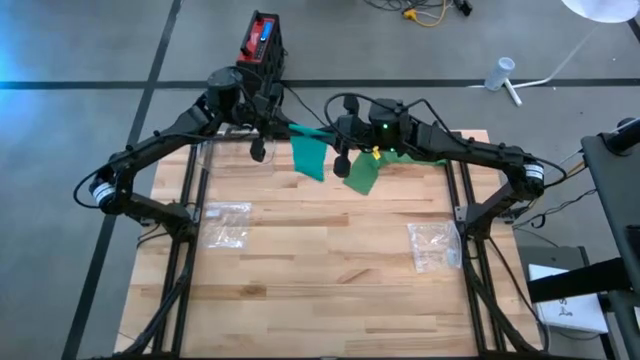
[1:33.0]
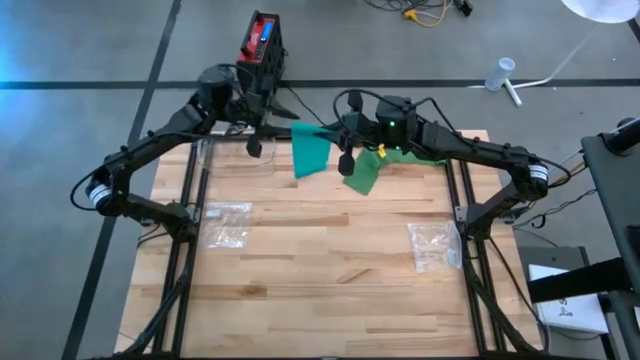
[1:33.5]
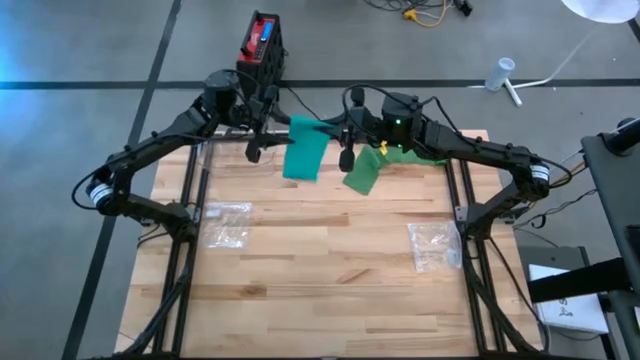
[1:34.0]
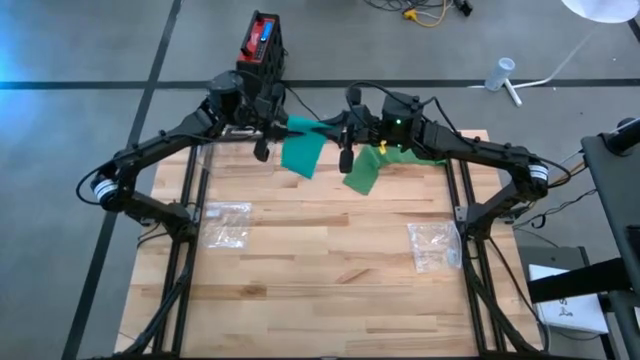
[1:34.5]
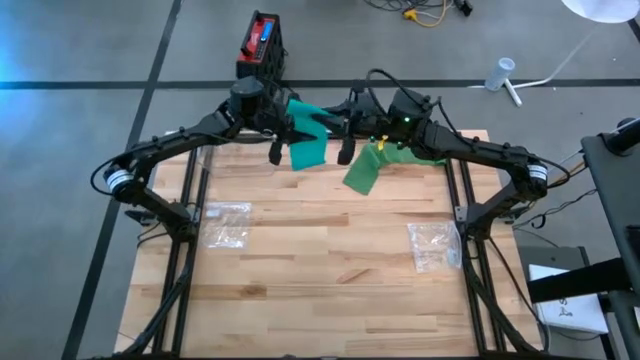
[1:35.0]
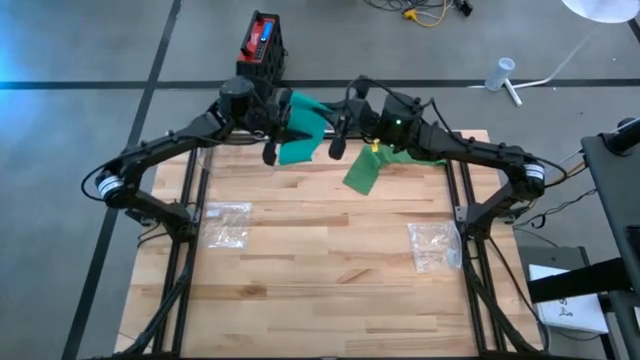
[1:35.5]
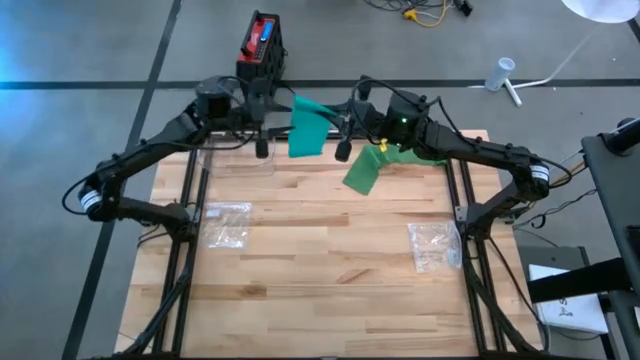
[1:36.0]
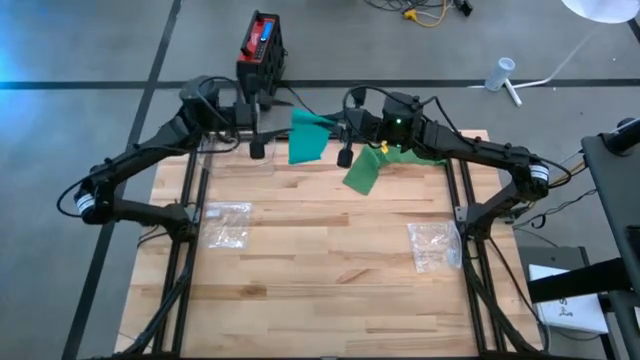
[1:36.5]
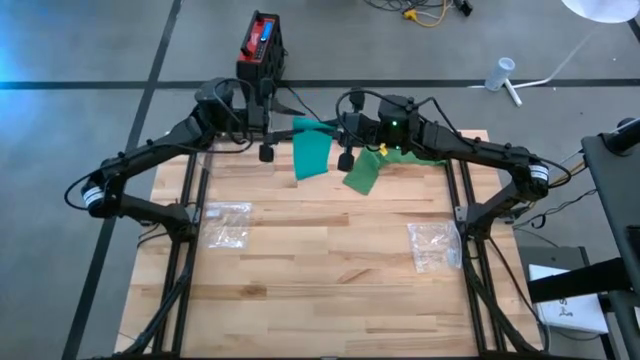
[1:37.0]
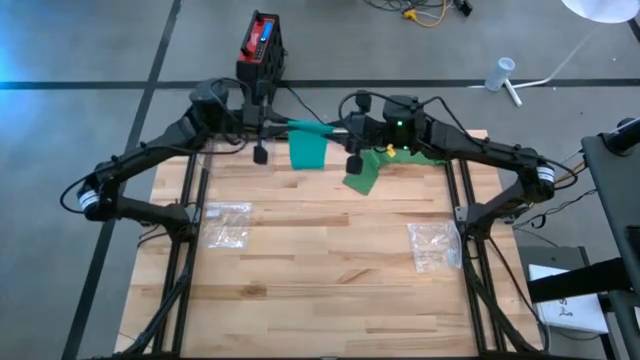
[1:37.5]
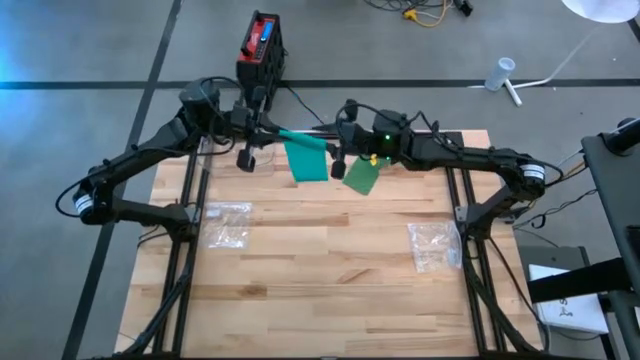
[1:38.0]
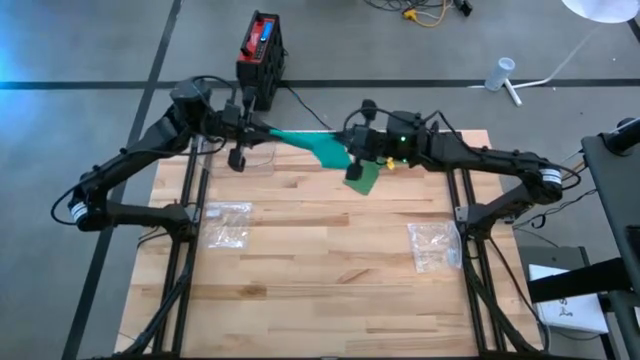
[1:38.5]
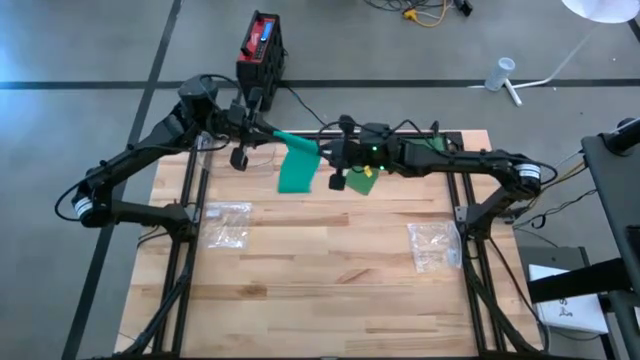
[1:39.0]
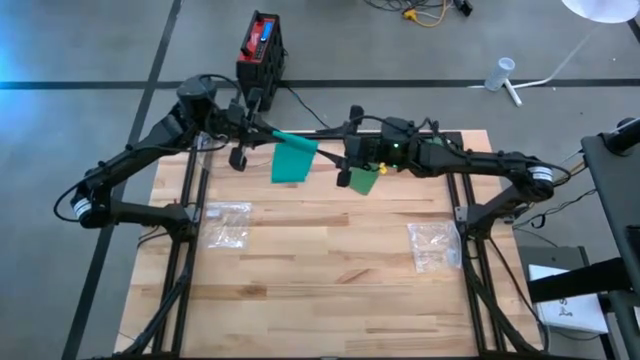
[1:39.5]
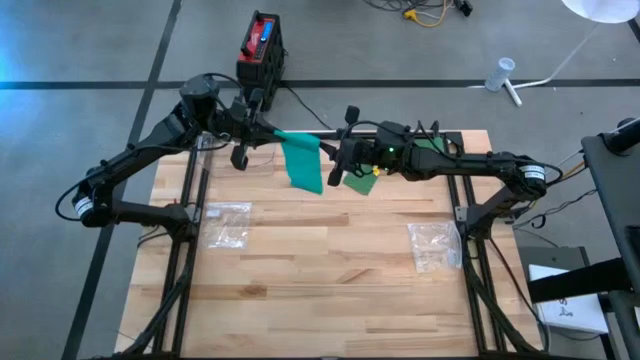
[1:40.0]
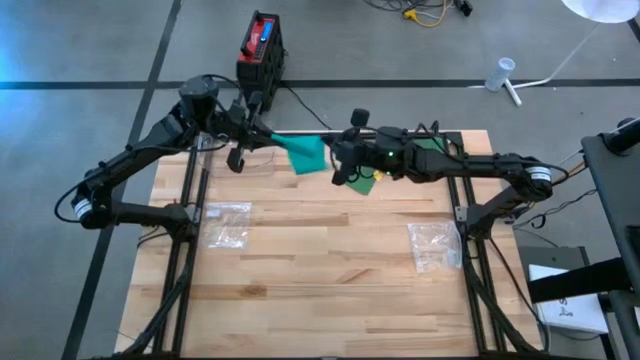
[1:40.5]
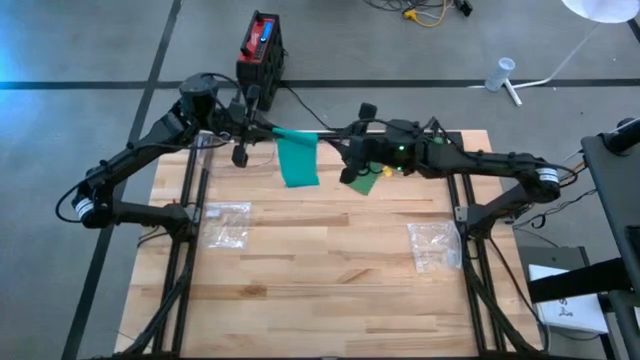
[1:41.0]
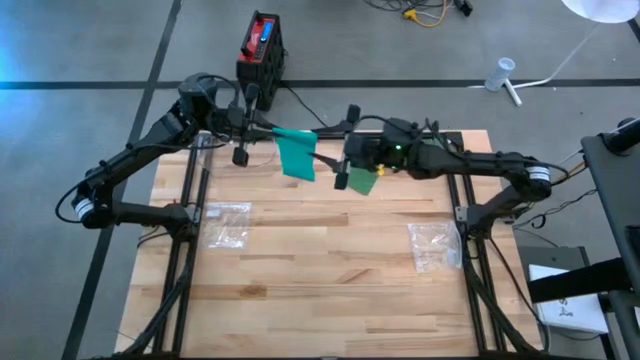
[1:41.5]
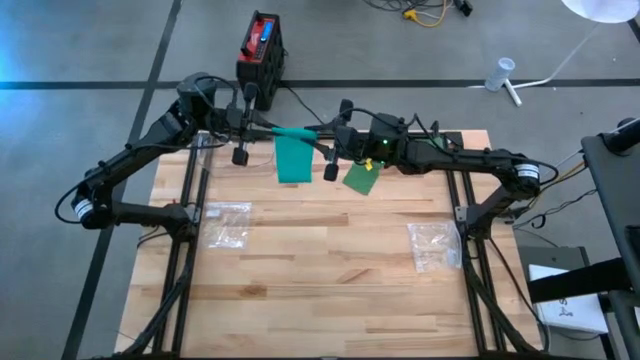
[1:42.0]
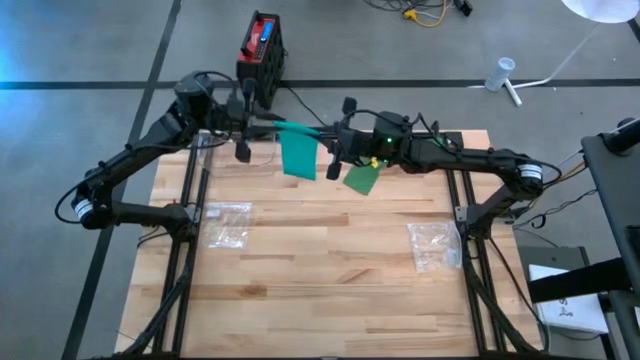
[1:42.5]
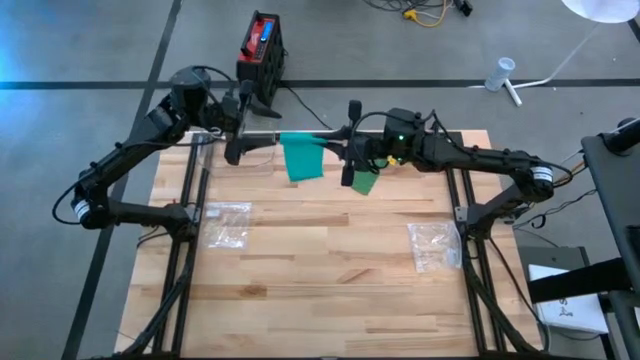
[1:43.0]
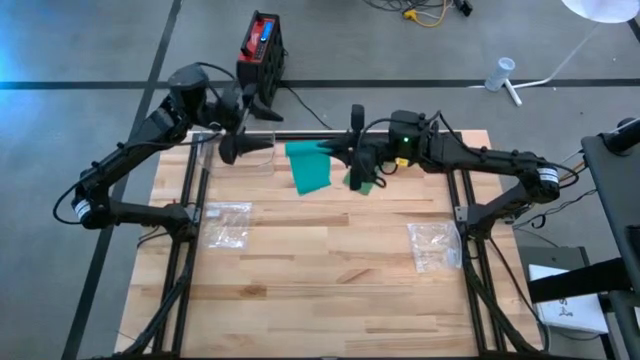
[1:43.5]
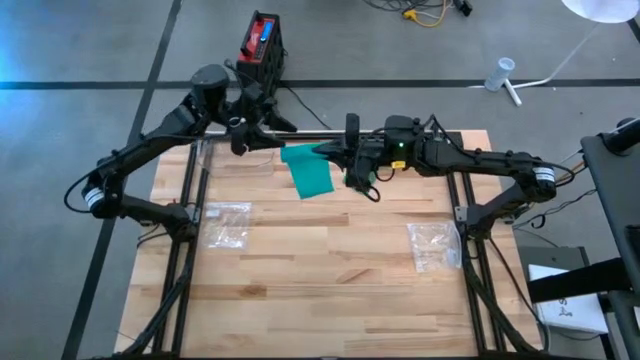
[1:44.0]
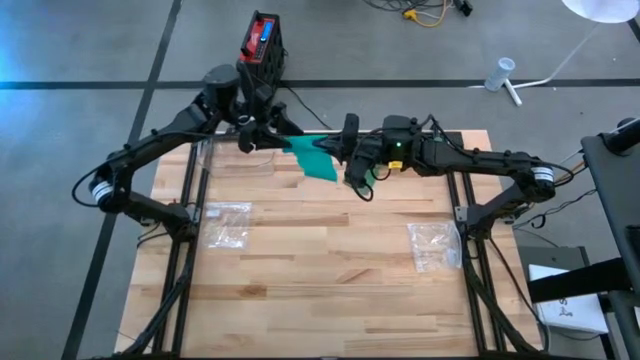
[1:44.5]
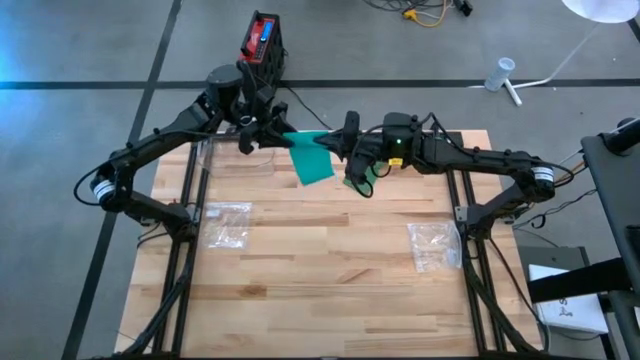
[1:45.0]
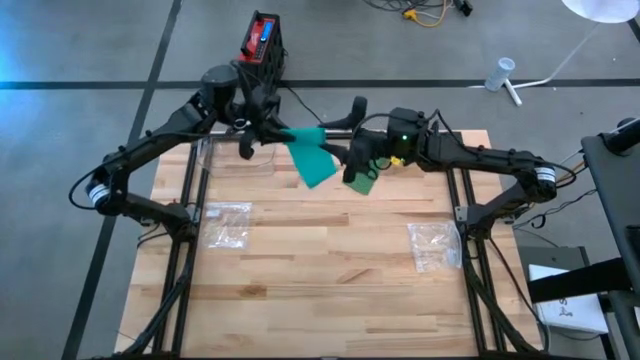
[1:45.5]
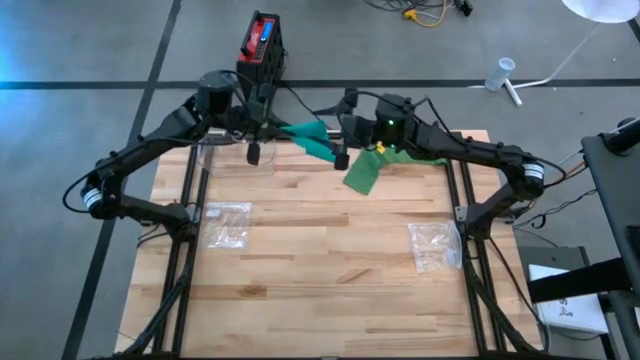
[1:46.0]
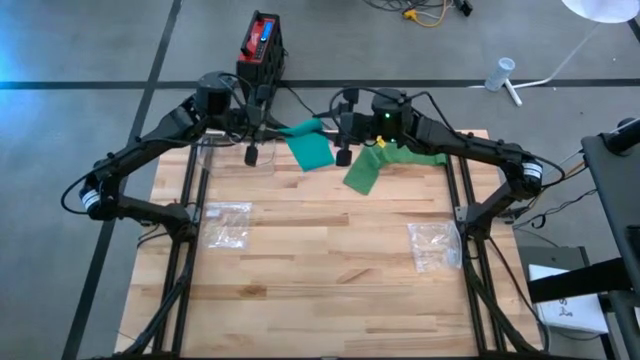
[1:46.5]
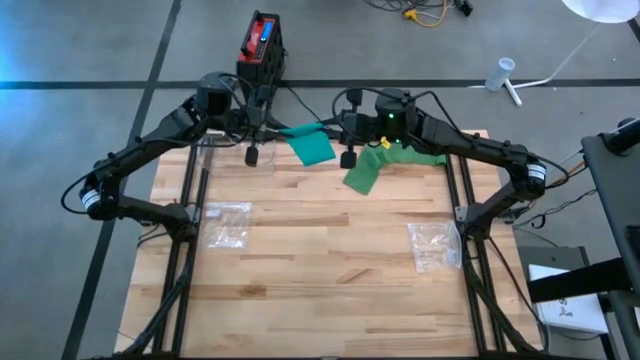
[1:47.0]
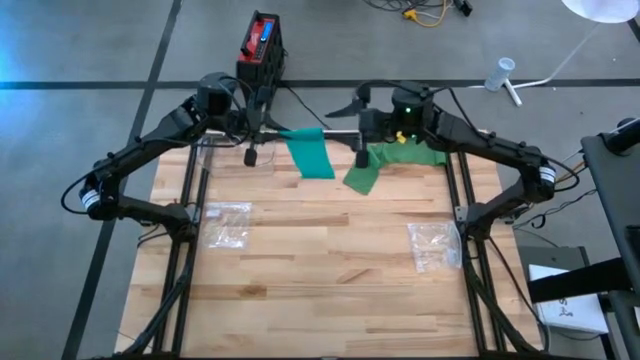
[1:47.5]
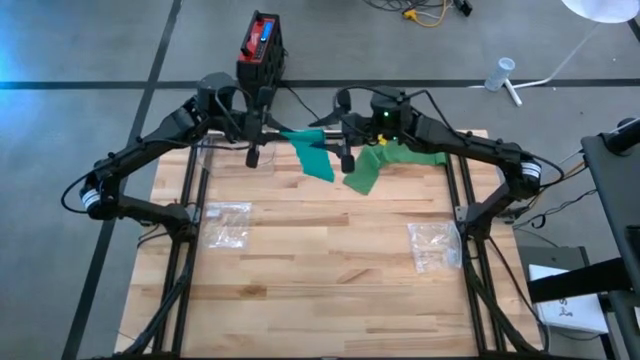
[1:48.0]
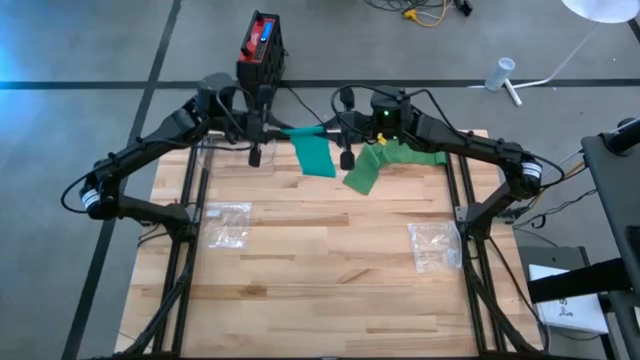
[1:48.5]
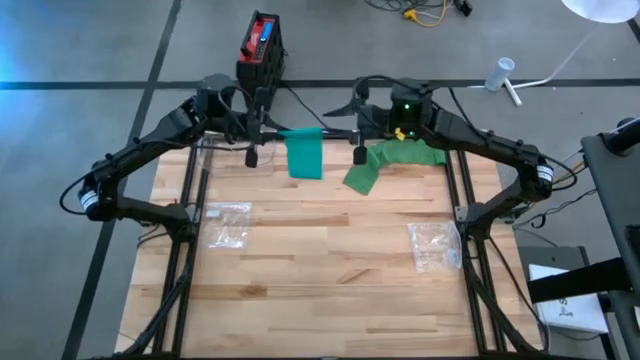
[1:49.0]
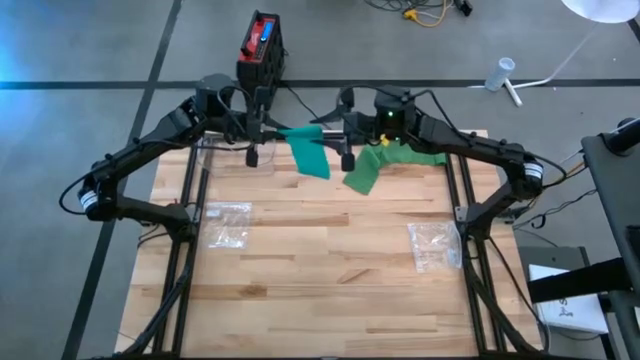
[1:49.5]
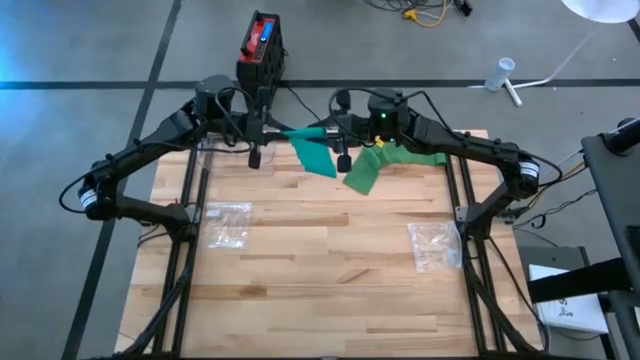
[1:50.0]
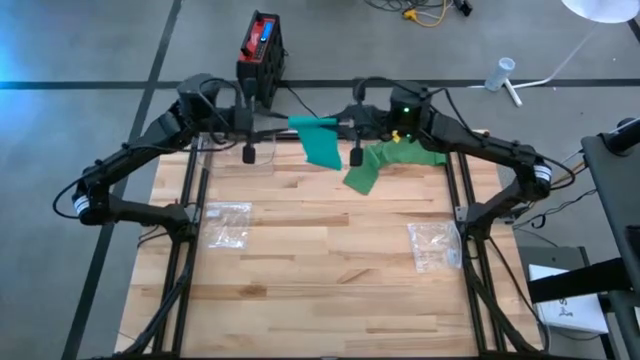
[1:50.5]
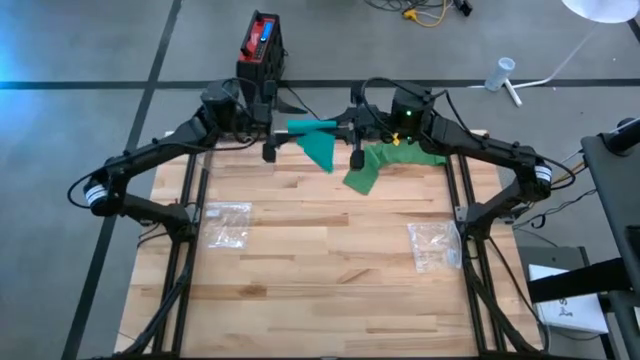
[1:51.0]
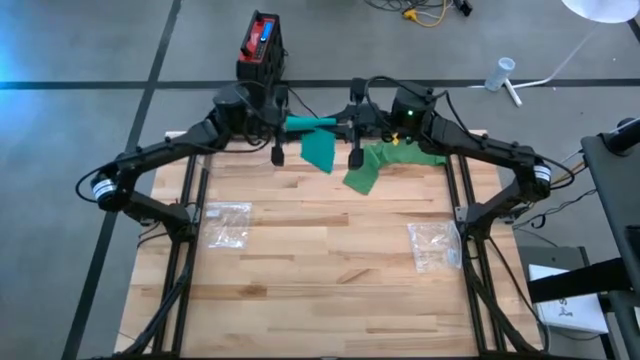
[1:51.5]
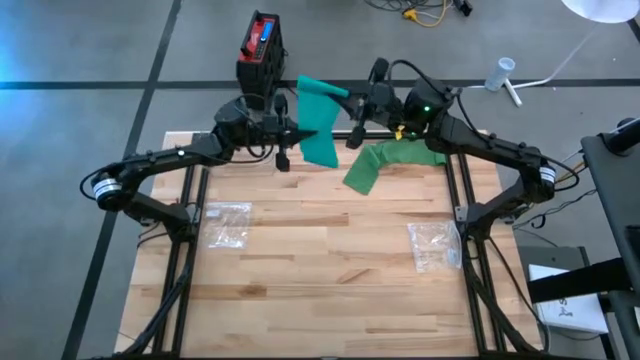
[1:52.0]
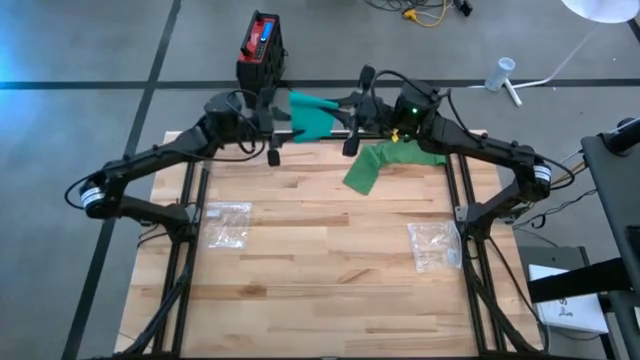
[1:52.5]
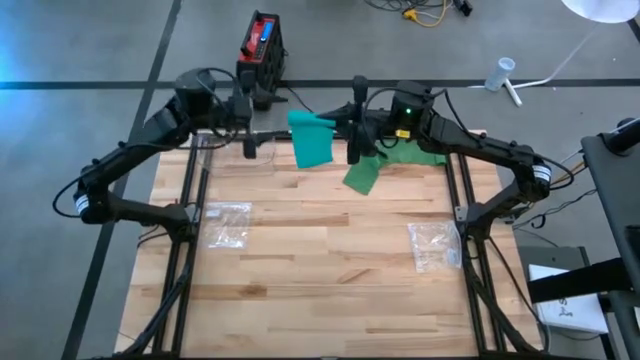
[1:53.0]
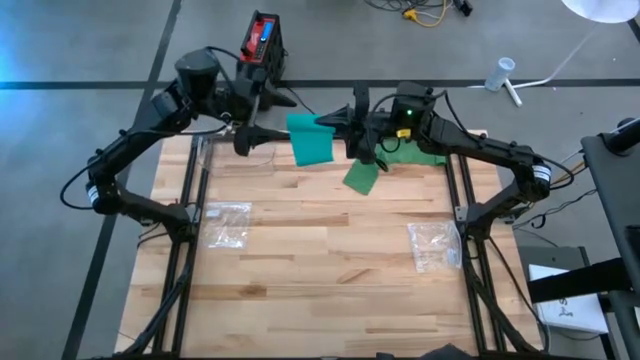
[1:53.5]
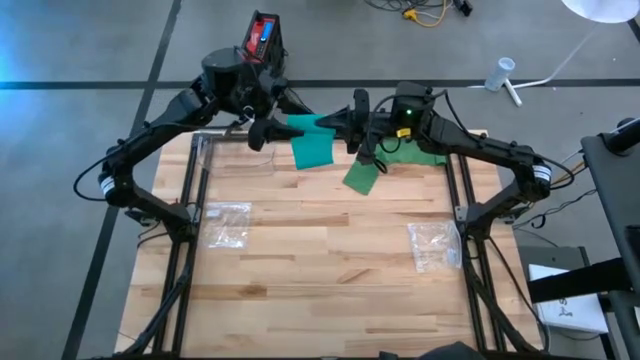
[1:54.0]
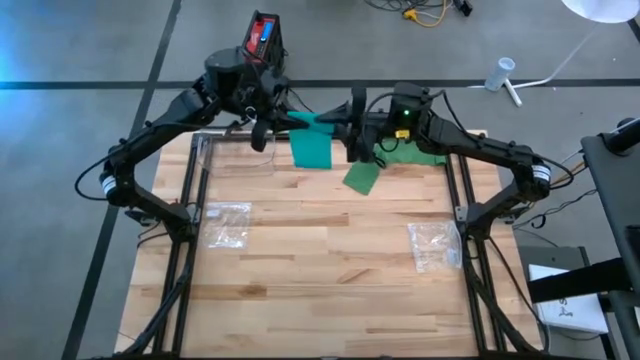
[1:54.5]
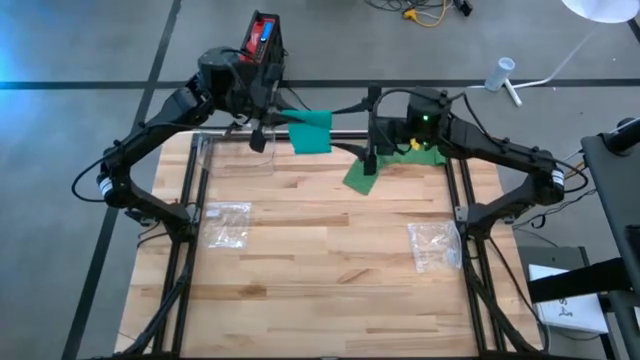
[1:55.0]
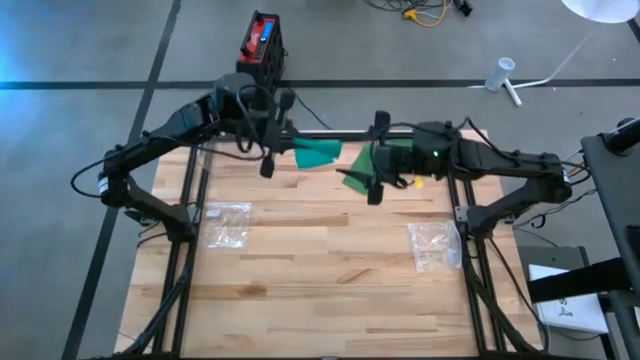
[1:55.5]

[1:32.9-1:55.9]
Task: Roll bandage
Roll the blue bandage
